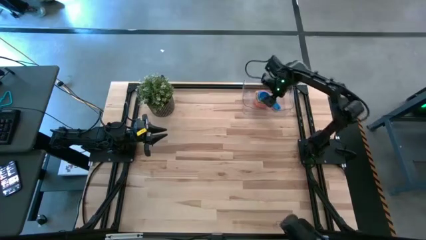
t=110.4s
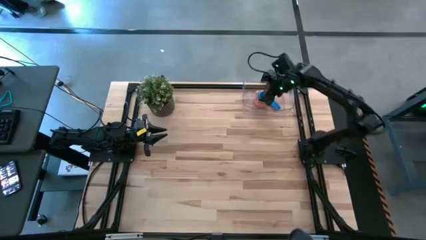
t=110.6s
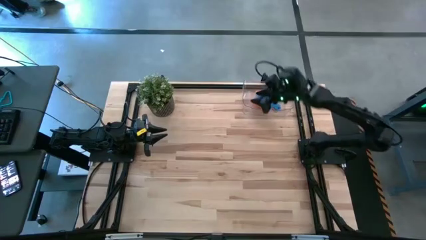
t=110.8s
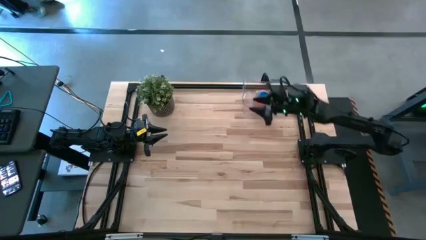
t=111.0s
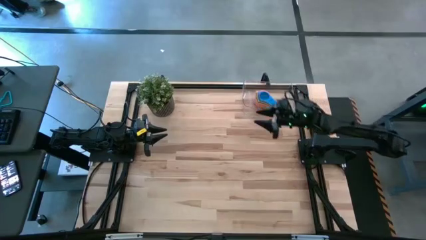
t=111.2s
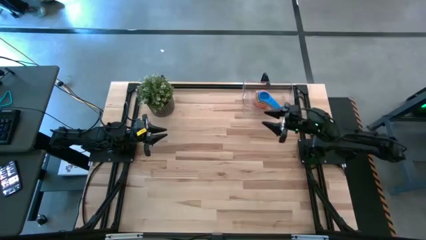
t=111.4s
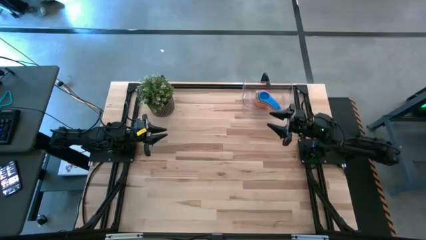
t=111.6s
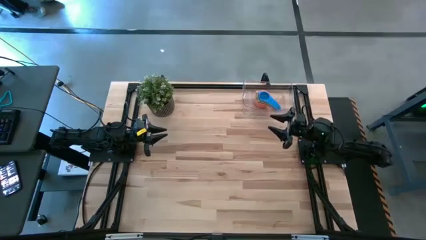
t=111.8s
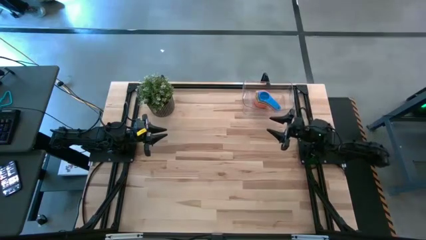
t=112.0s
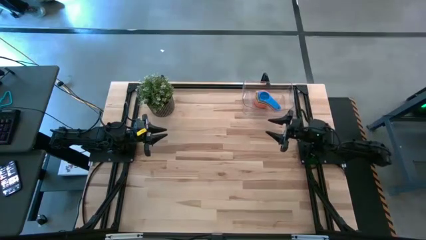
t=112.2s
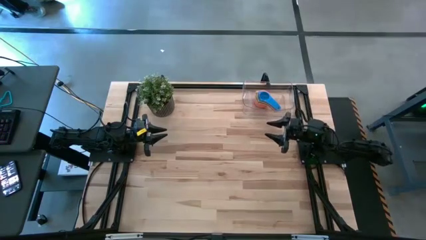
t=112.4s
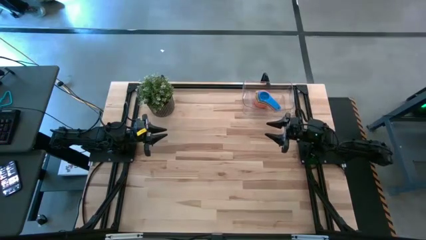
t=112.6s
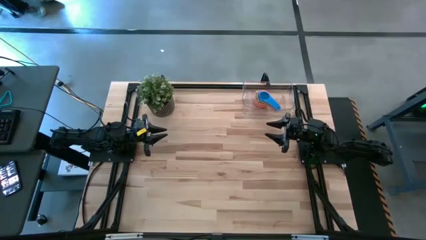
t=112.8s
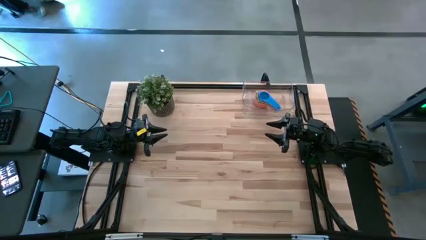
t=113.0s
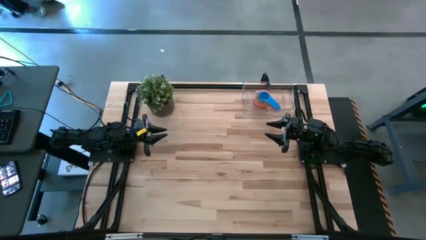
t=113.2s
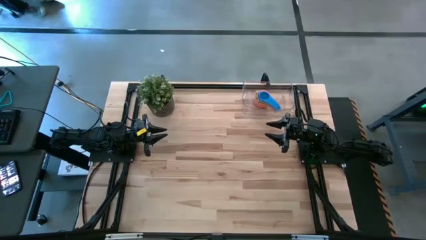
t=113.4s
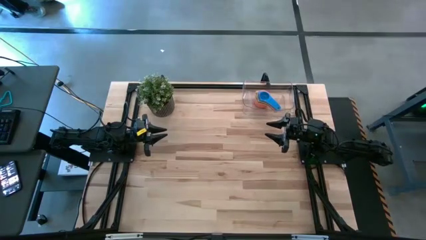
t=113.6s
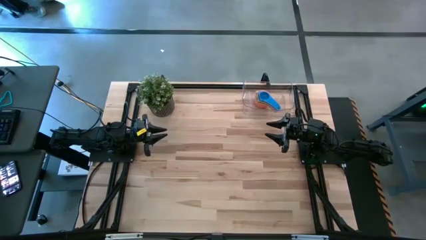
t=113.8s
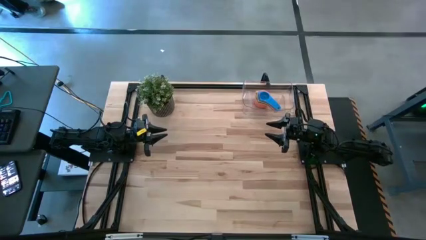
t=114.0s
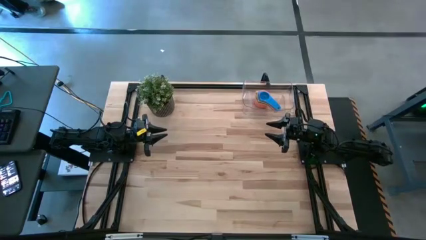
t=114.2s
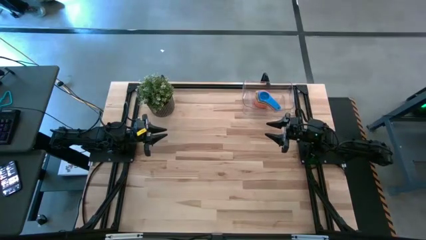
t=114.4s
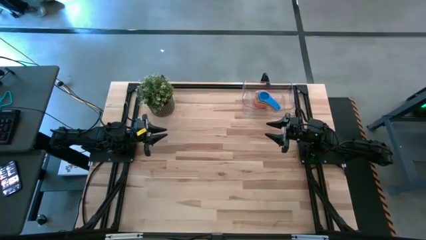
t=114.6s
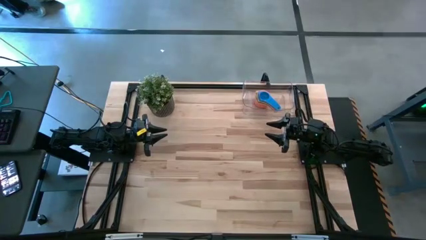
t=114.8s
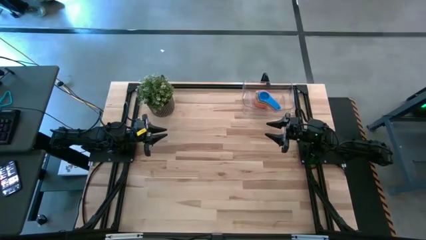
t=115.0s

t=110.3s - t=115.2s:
Task: Nest measuring cups in basket
Return to Home Position

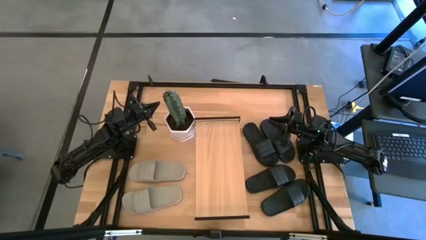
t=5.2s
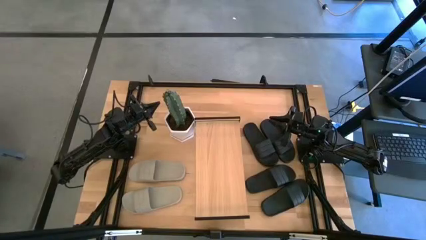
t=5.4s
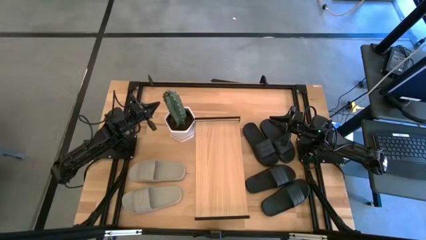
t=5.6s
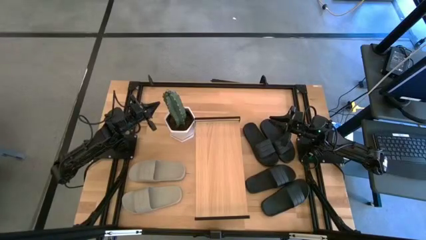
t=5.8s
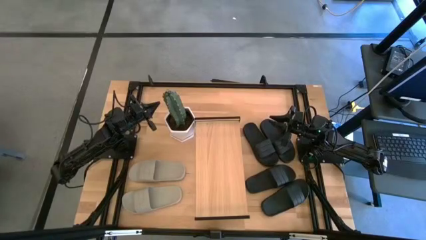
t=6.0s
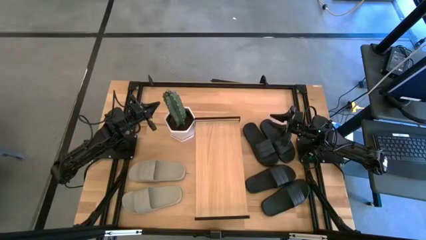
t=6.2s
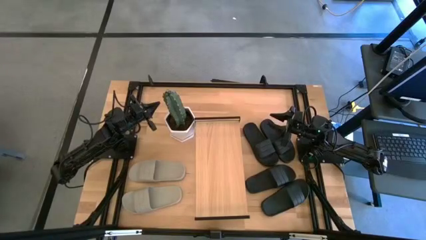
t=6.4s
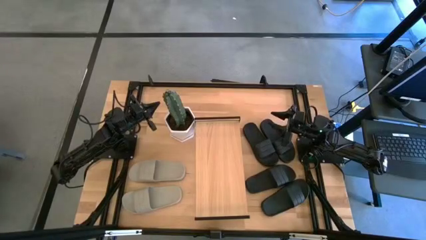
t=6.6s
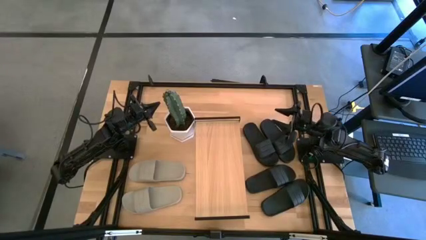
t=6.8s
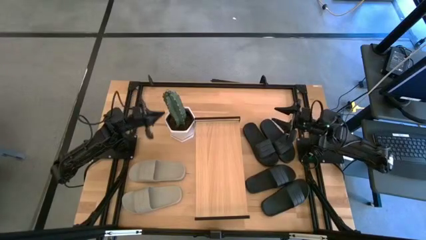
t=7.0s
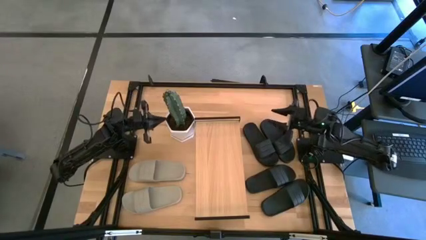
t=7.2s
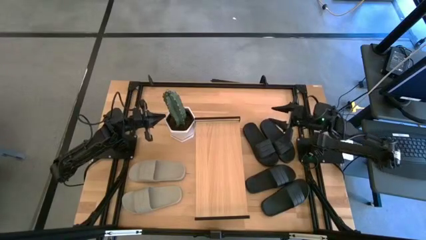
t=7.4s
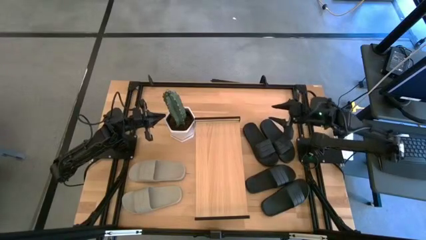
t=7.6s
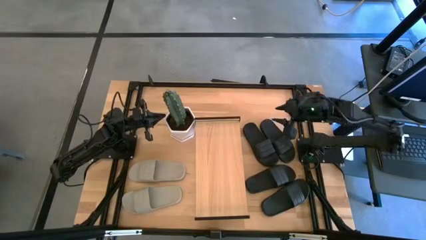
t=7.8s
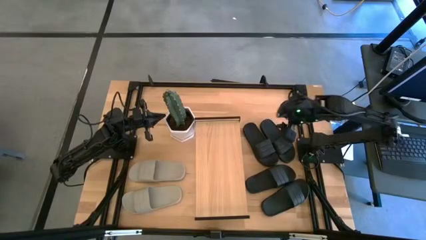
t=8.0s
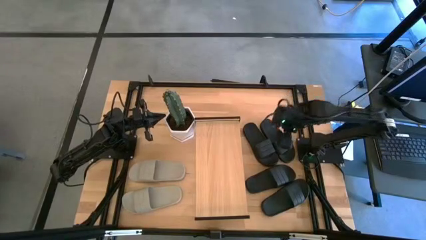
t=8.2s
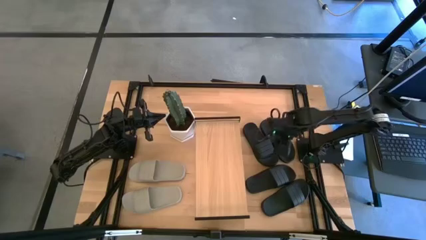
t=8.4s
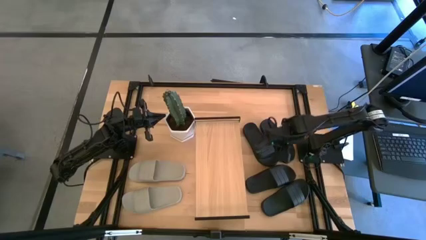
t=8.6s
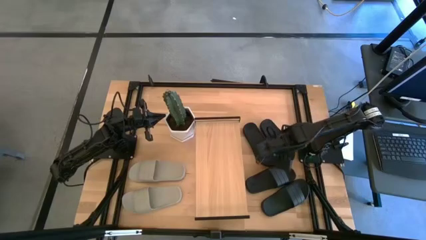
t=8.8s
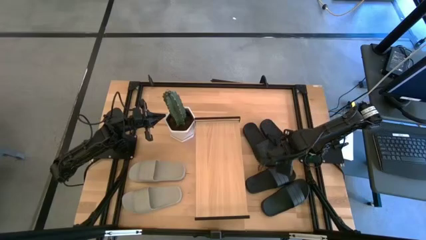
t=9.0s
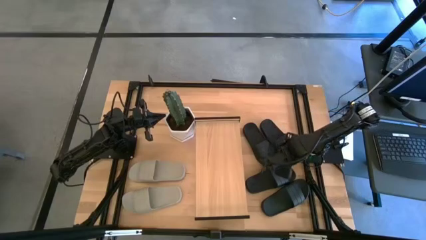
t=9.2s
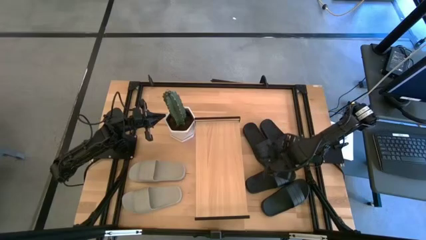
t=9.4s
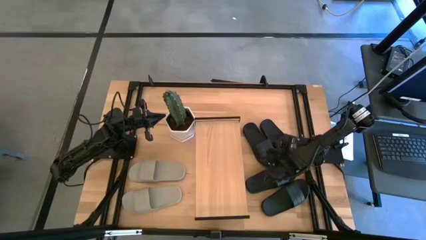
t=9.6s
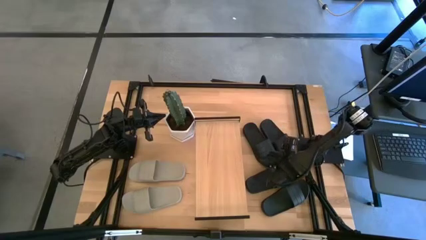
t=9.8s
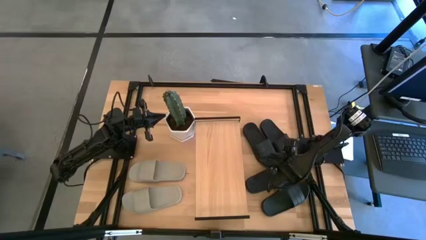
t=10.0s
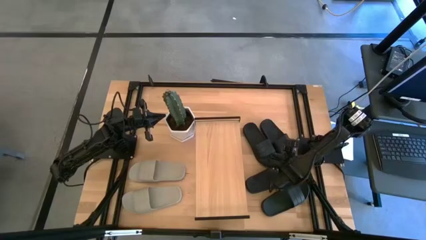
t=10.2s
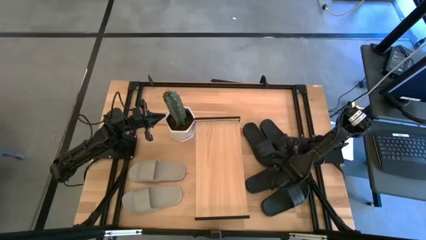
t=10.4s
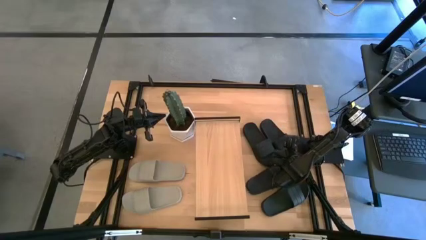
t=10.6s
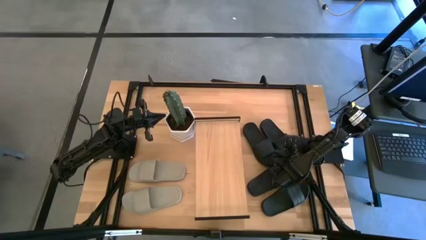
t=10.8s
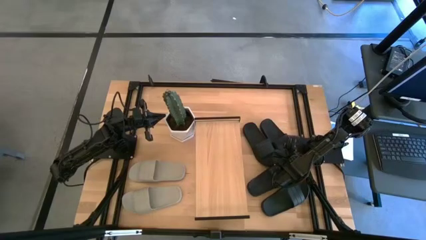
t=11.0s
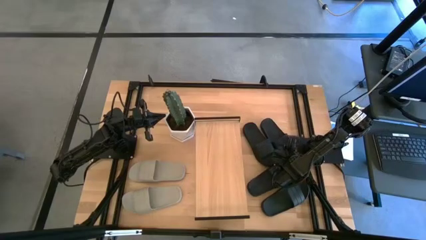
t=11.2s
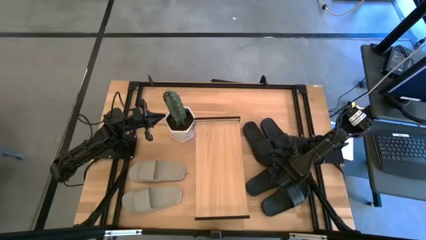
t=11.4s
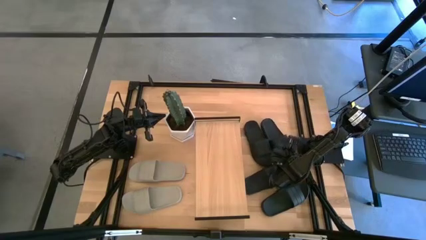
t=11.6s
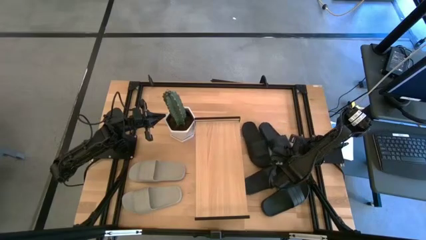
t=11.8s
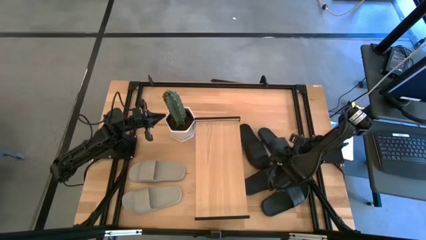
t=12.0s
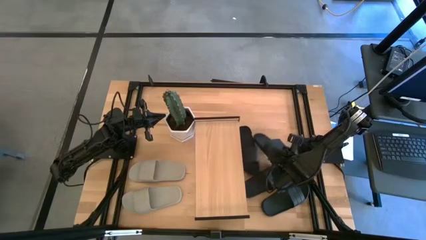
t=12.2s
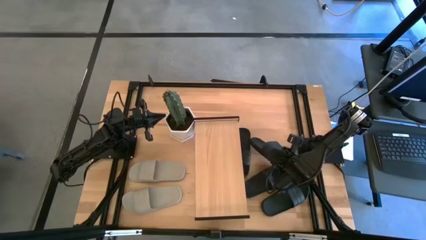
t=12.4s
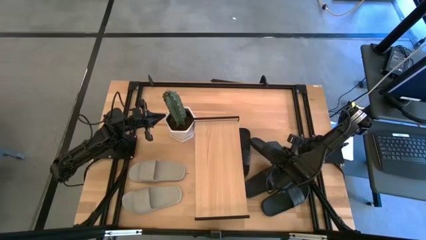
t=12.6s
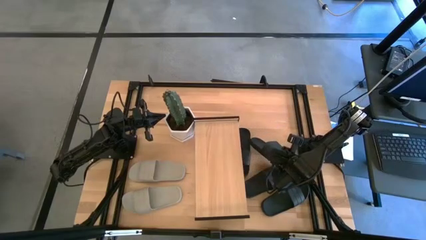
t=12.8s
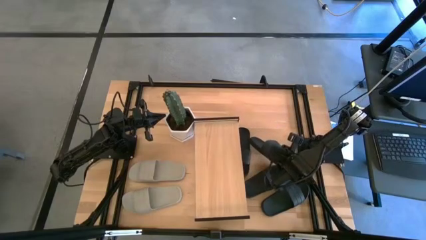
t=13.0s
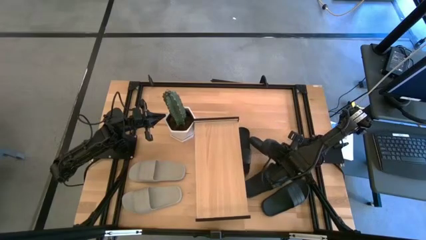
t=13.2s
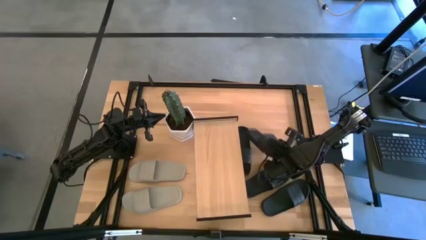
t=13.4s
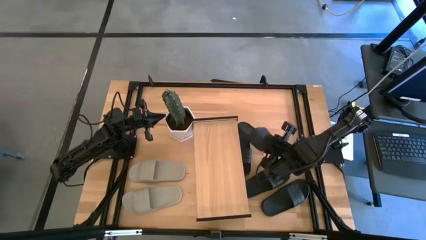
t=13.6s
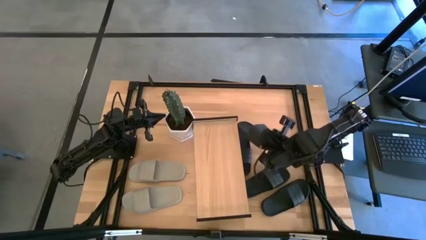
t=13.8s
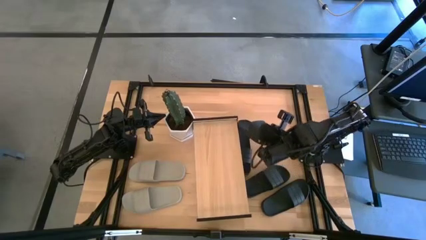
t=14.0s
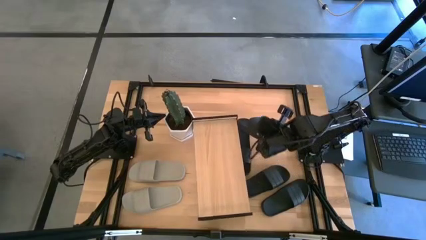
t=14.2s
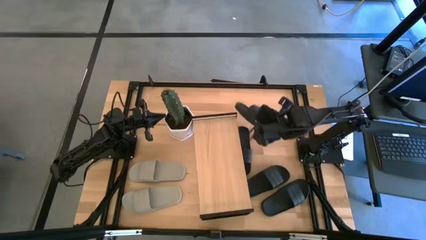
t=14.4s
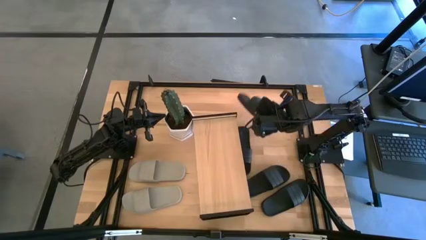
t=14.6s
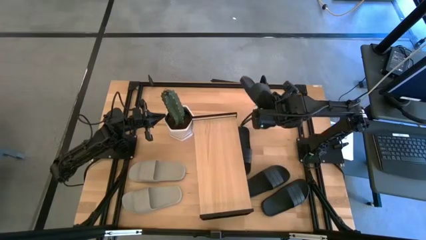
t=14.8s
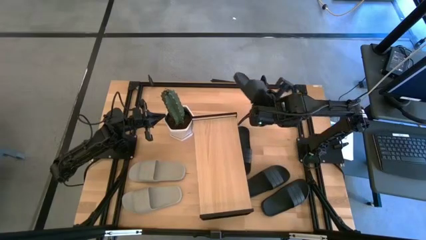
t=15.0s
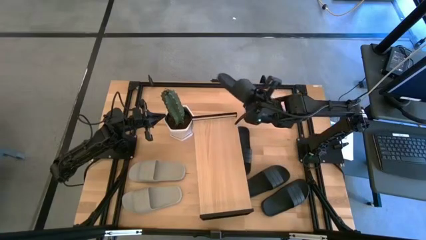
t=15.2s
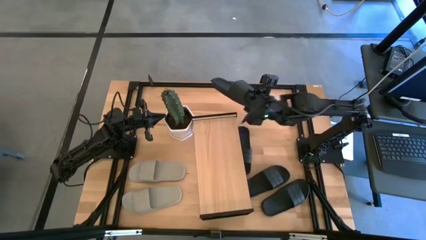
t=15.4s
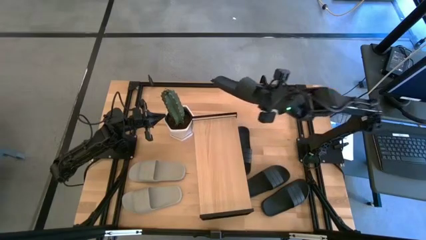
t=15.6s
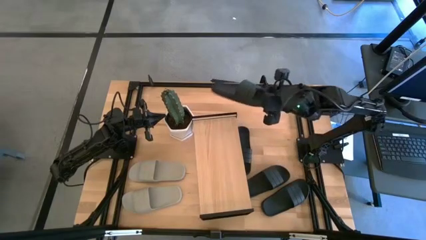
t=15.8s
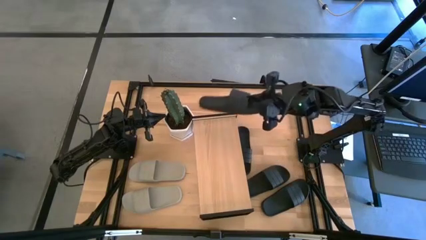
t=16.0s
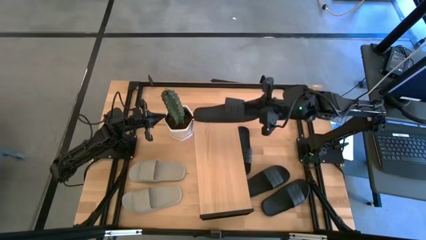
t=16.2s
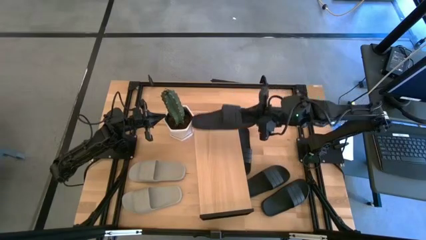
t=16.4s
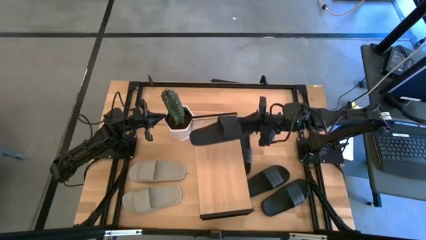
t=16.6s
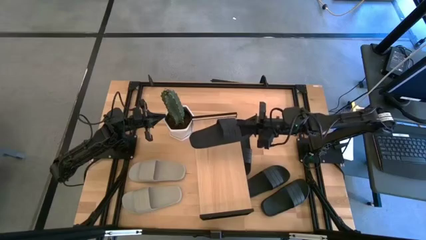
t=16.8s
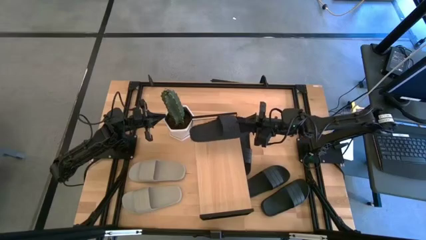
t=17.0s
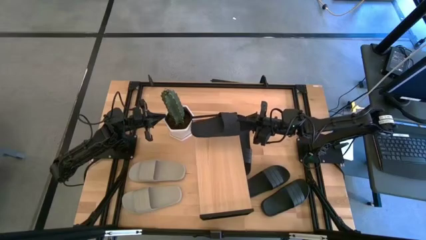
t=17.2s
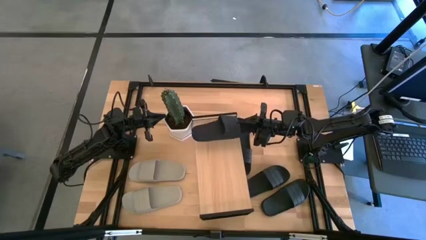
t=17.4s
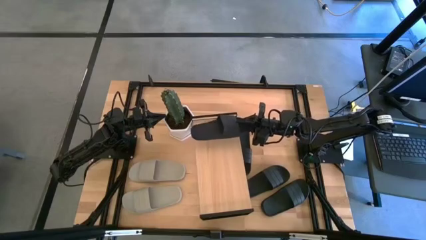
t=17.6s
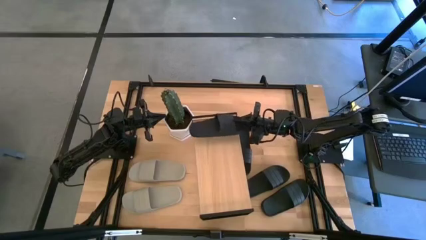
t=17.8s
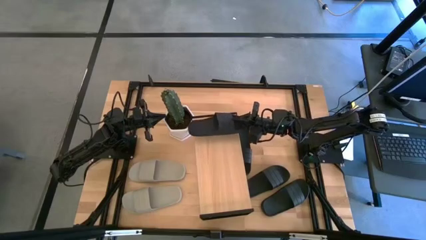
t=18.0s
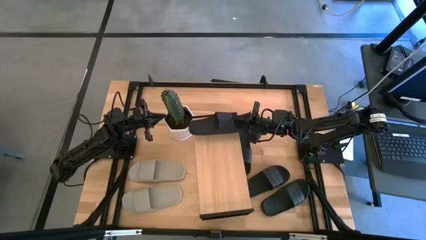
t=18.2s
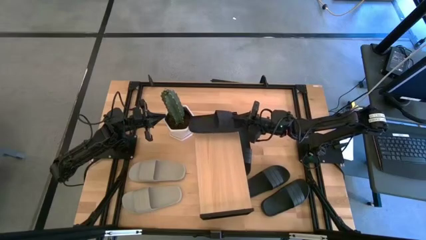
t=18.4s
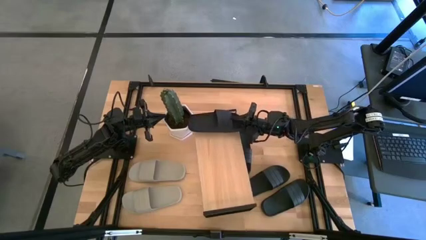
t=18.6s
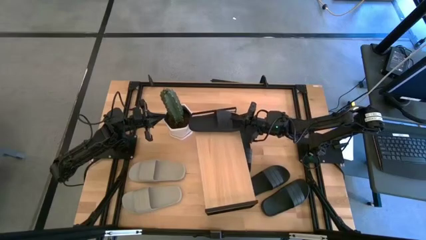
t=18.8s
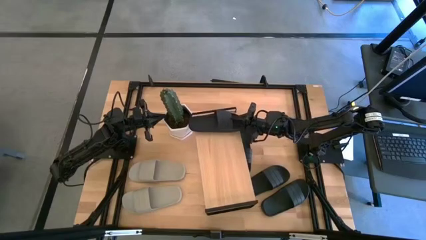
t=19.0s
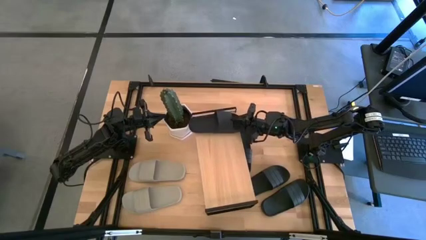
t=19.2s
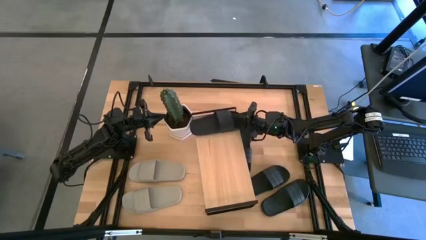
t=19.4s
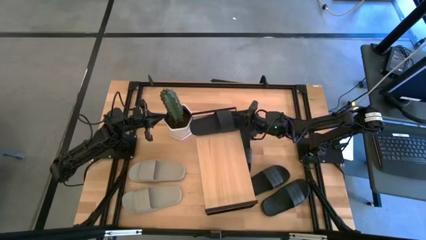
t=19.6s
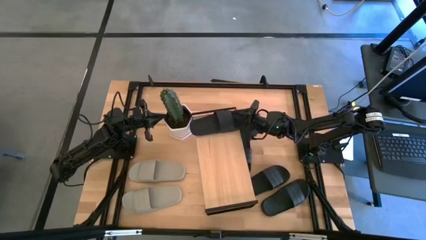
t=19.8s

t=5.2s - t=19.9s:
Task: Pick and place slides into the shelf
Put the black slide on the shelf
